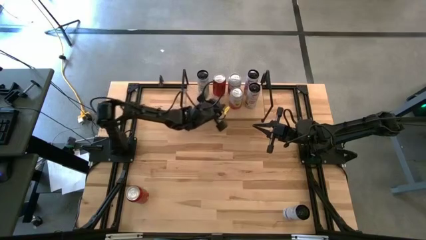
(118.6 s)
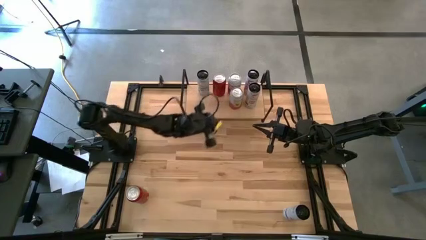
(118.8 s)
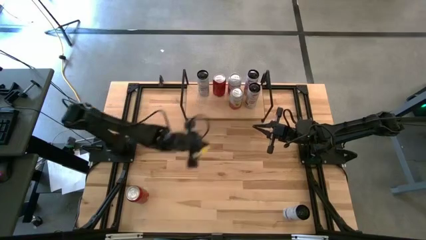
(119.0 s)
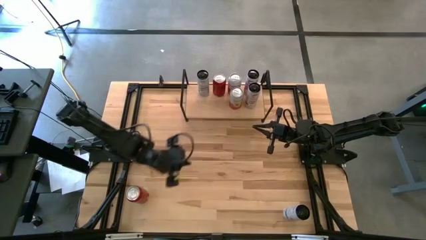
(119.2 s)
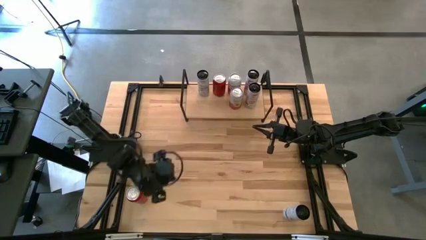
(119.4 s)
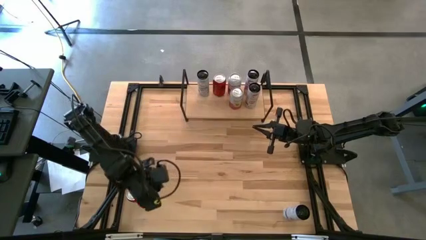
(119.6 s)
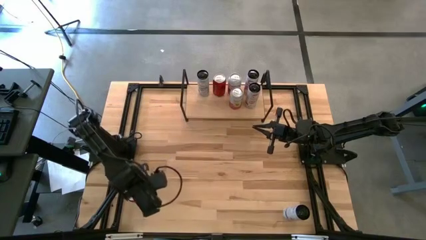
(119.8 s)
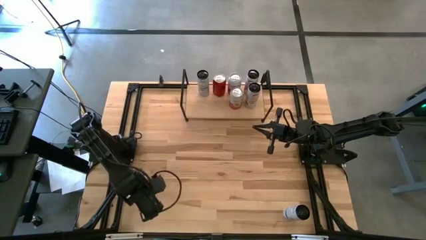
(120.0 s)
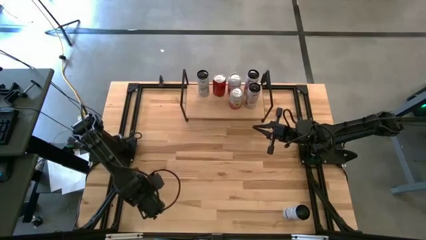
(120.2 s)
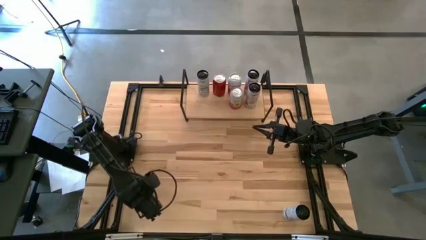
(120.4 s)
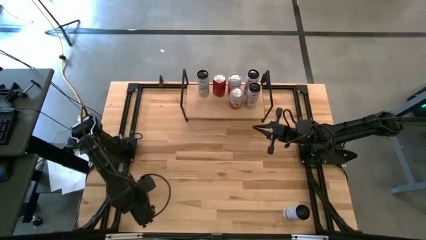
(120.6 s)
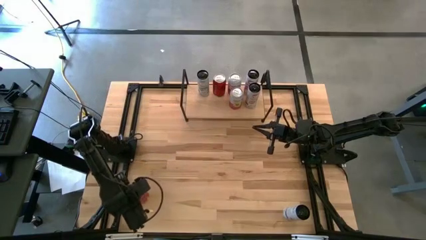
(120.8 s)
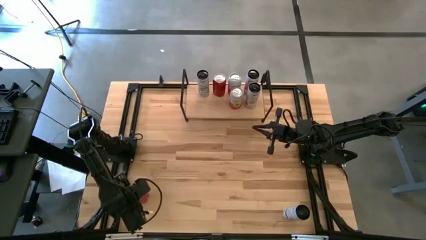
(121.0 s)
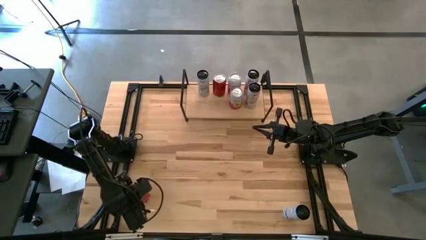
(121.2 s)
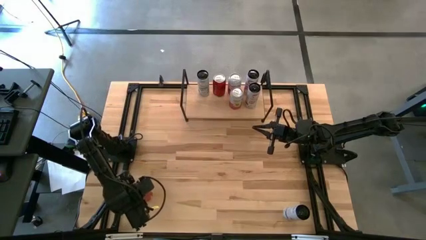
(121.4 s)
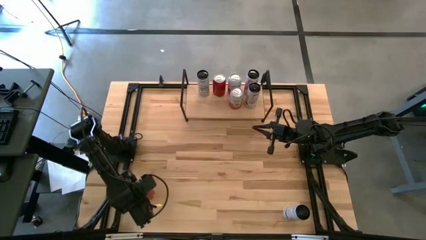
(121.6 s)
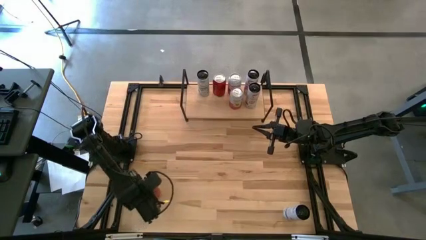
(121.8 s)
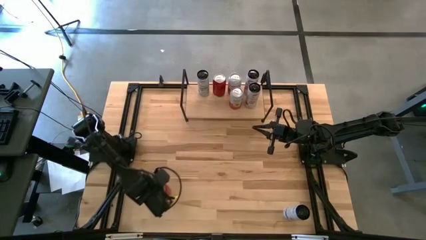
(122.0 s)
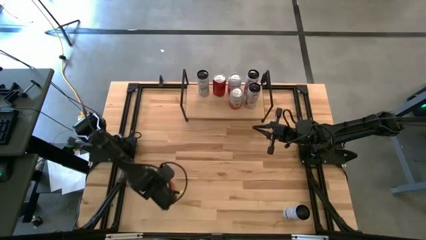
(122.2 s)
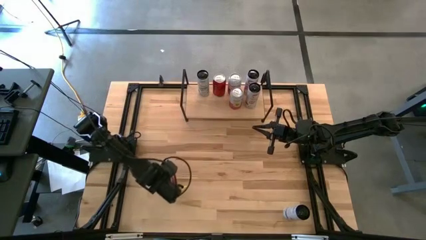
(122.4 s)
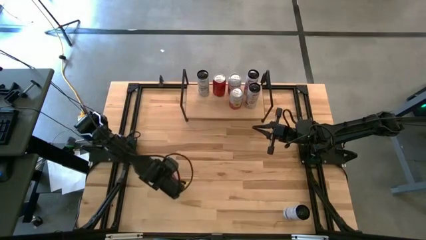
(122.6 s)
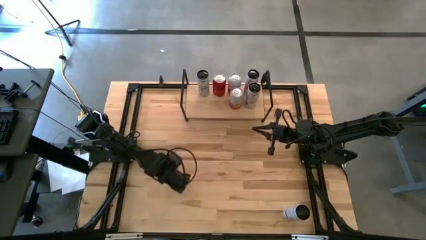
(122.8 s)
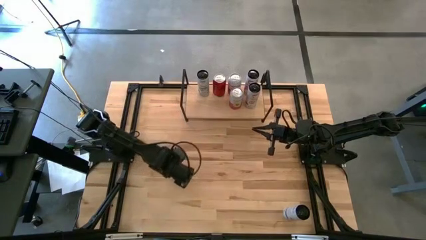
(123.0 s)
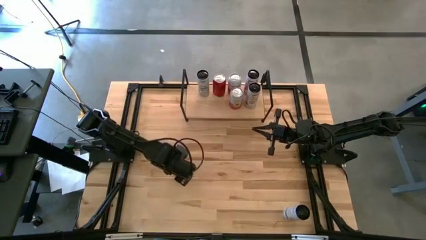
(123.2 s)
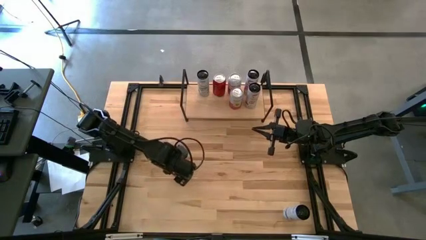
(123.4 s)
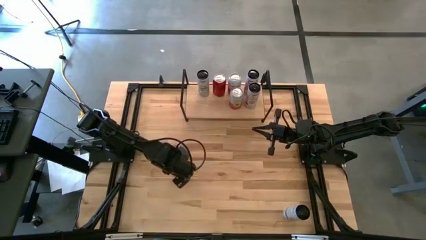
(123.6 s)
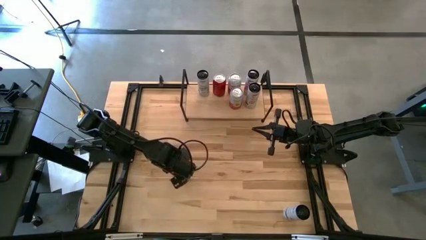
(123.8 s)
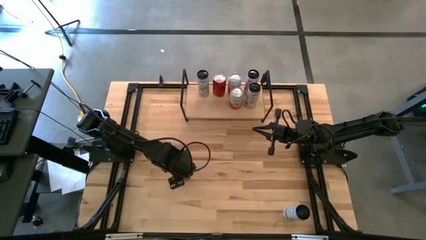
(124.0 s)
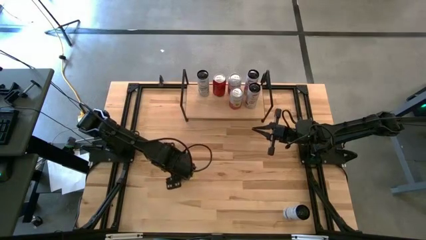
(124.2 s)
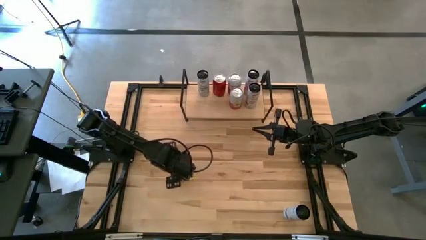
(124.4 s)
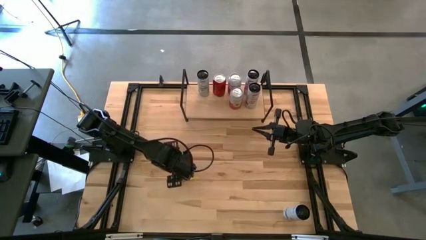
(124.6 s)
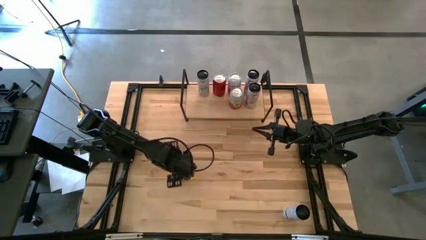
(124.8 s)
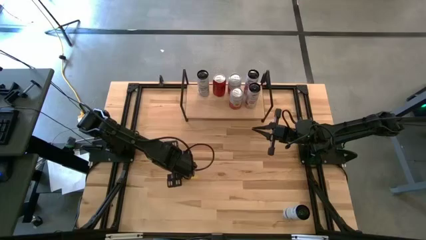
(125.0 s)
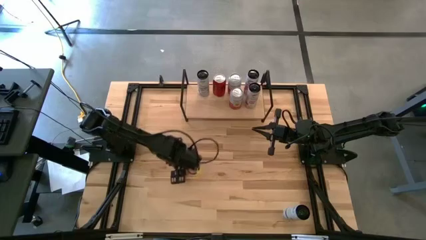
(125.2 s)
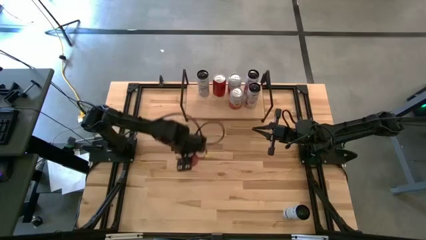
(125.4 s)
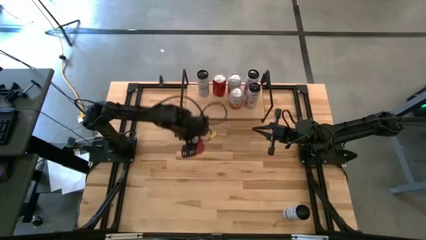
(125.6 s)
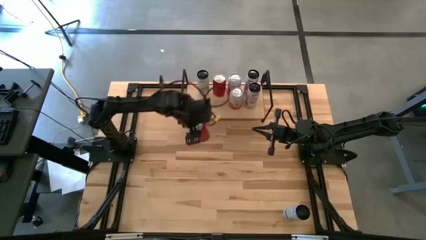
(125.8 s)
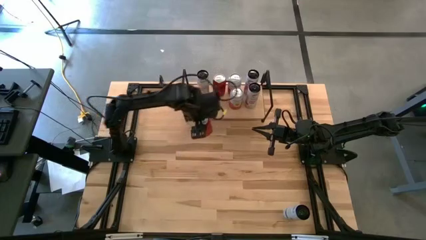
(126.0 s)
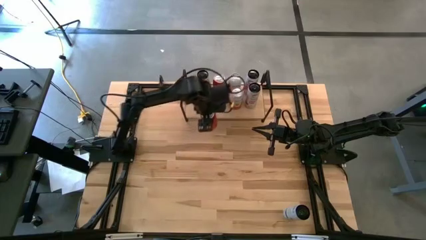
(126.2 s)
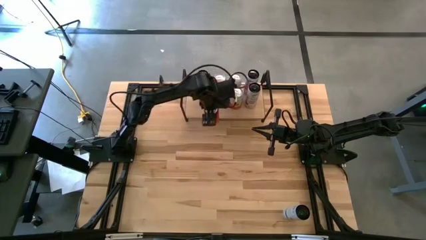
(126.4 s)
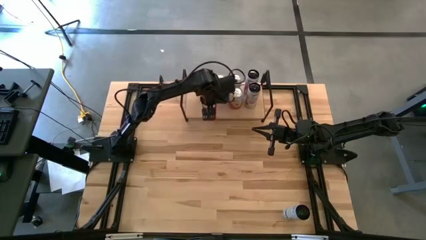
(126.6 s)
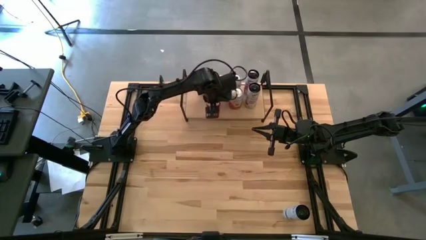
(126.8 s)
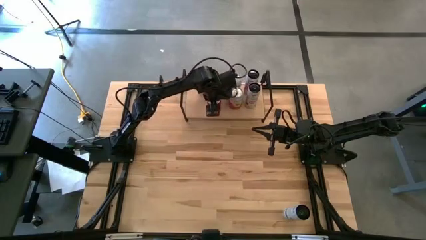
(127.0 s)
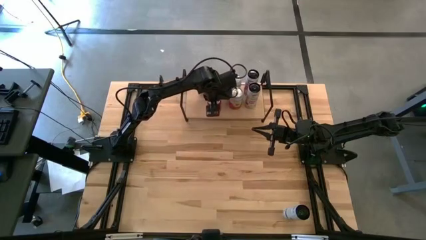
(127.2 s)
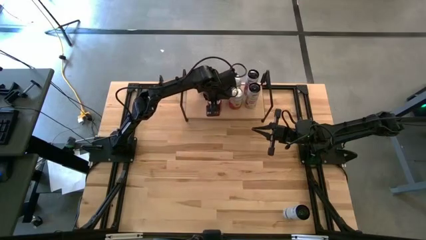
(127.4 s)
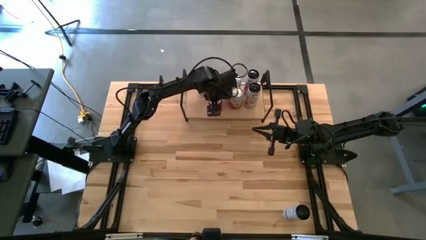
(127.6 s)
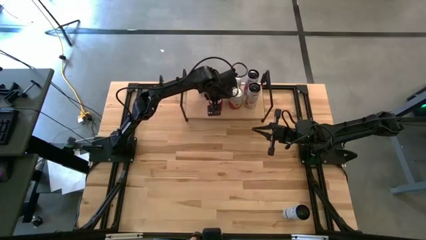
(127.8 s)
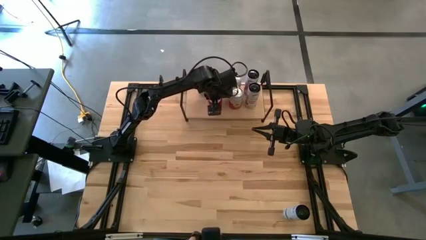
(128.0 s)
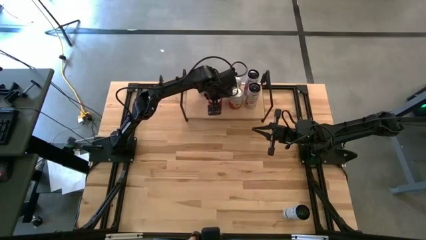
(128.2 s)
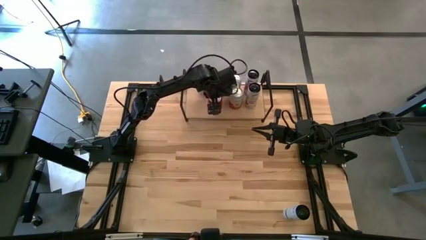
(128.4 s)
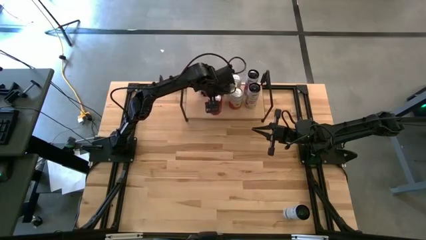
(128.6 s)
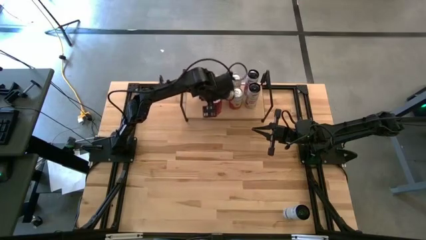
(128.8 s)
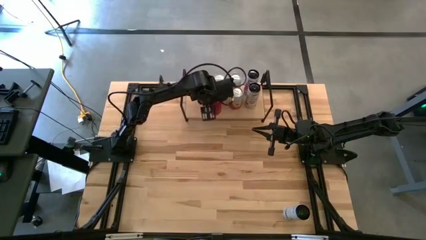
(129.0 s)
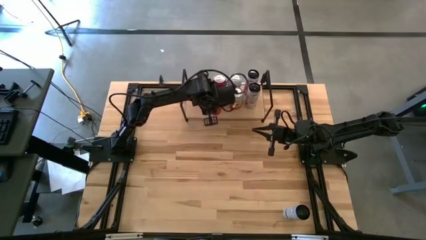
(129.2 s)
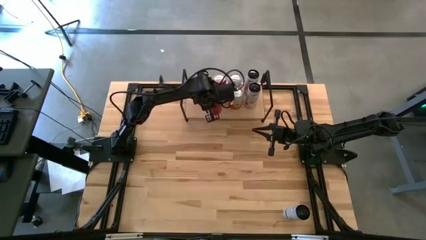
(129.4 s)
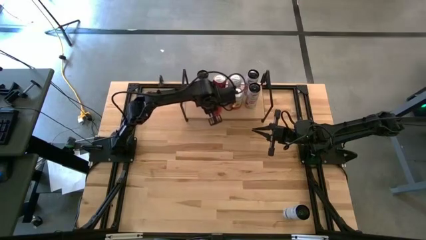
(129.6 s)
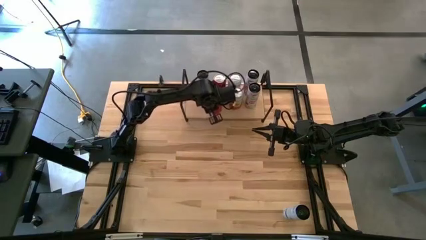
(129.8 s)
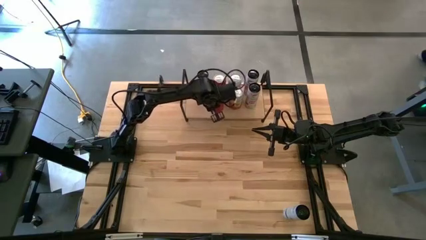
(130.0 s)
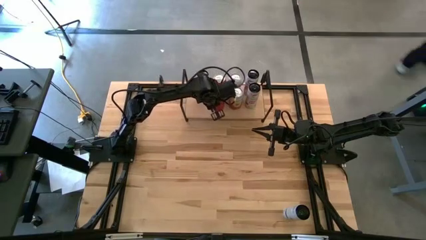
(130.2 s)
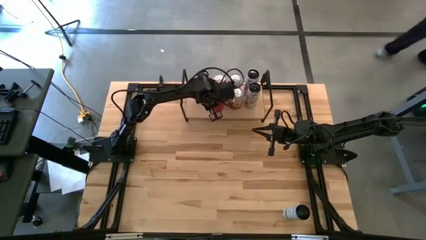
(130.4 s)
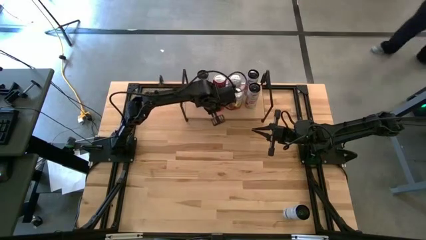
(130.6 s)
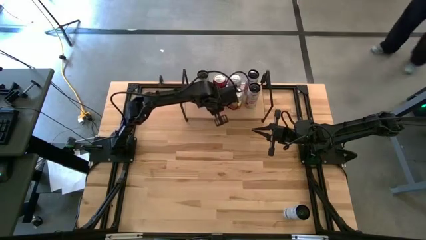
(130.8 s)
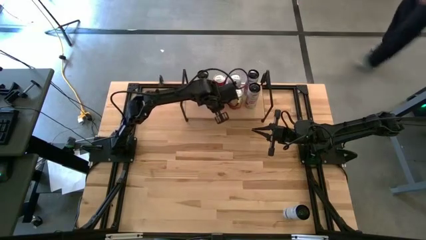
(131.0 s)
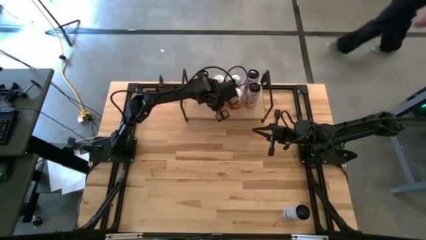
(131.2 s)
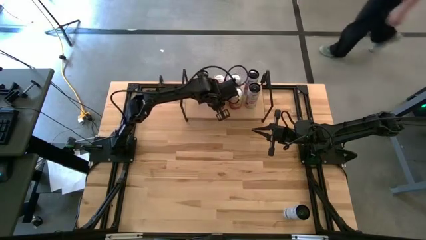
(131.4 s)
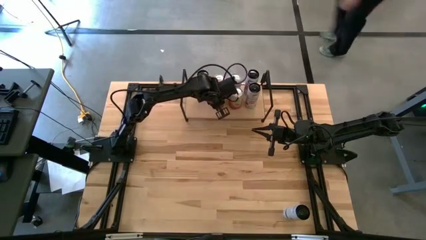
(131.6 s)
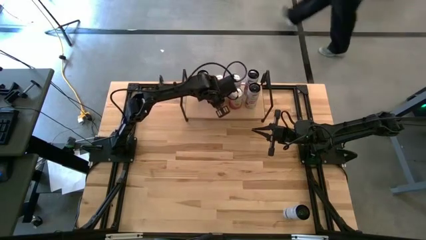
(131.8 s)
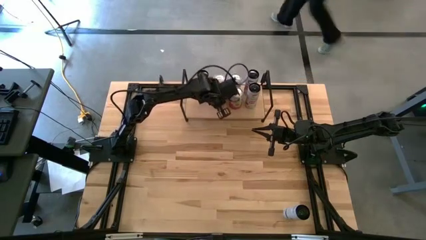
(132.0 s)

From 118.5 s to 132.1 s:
Task: Place canned beverage on shelf
Put the red and black soda can on the shelf aligned with the other red soda can

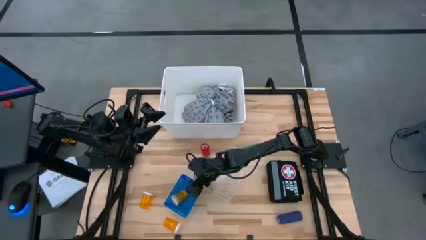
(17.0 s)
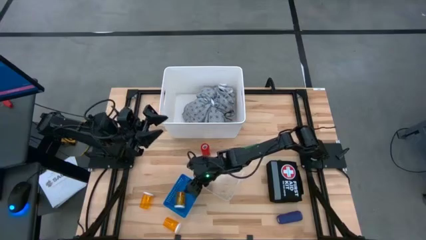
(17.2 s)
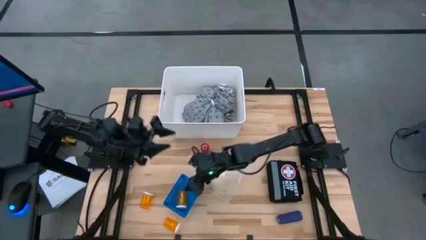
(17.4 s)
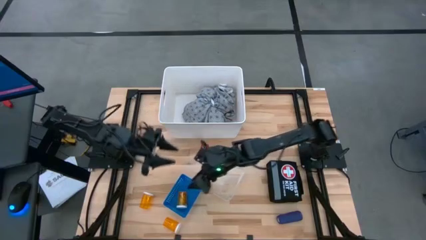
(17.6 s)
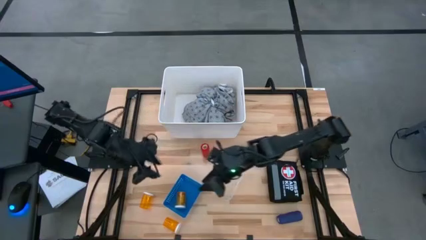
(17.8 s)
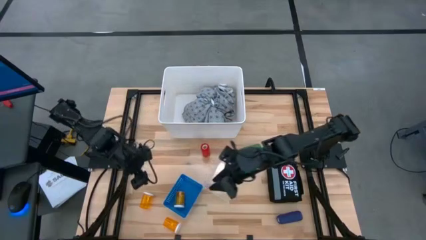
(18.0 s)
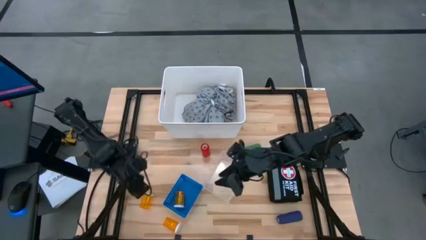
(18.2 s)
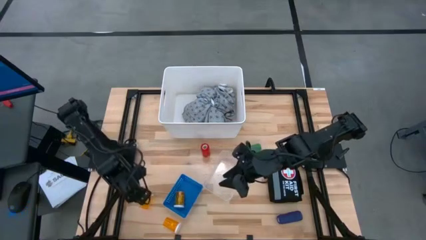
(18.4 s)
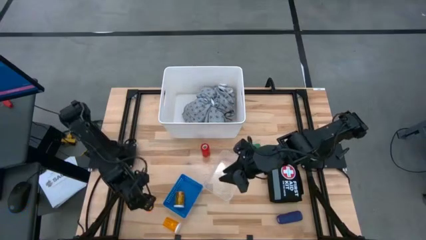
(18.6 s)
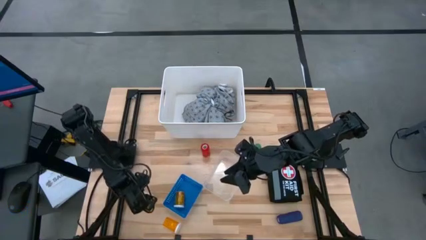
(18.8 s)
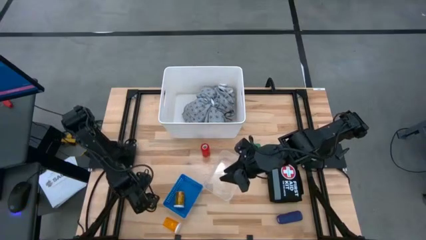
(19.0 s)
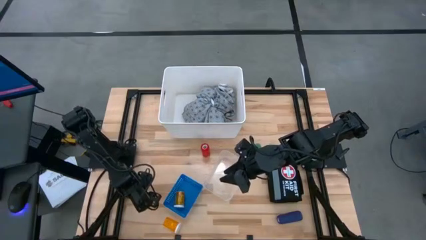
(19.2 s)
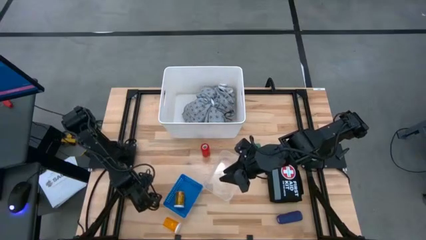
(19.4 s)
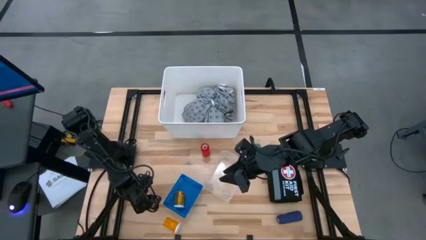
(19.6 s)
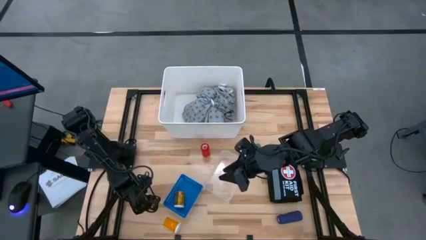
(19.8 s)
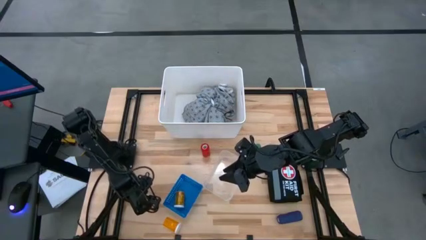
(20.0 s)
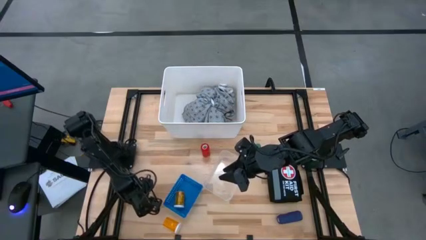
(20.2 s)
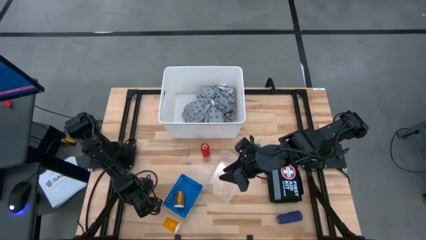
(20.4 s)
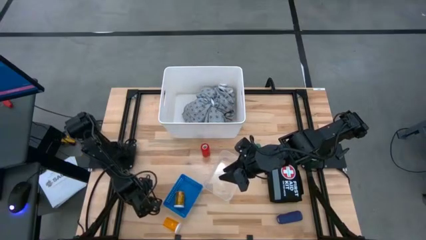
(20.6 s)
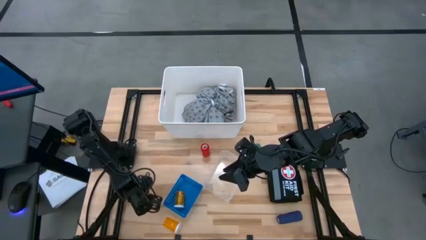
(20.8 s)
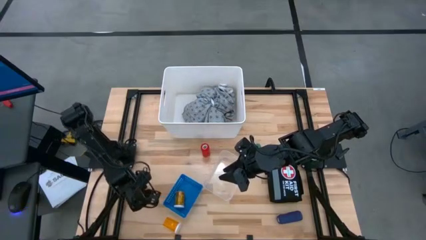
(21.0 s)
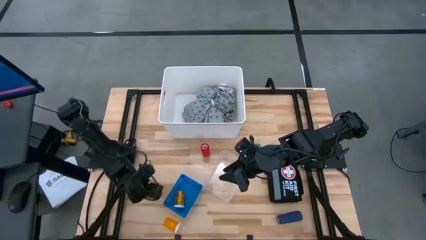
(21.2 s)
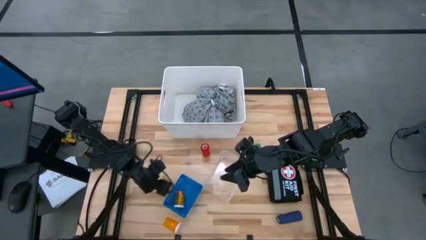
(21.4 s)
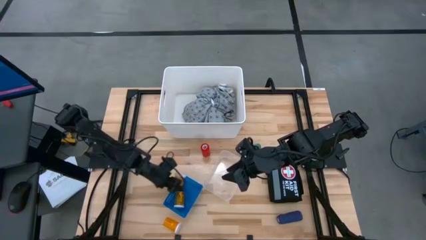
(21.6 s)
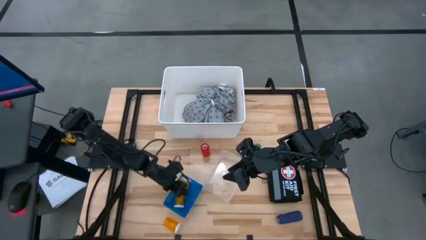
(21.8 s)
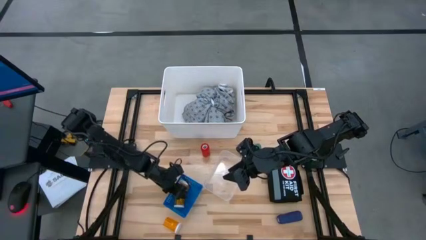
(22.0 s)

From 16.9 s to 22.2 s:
Task: Pick & Place Medicine items
Put the left yellow bottle into the blue bin
